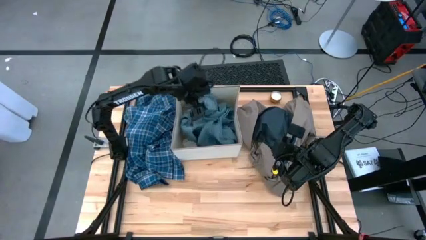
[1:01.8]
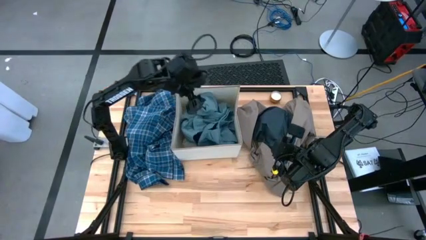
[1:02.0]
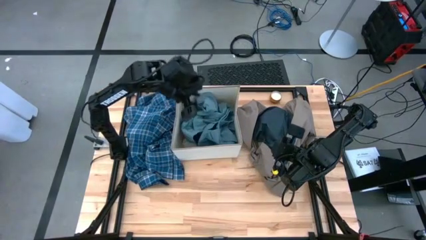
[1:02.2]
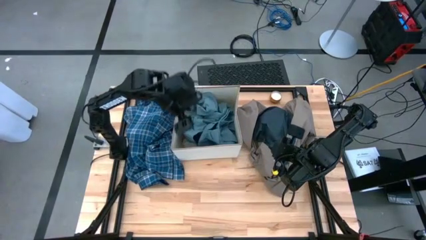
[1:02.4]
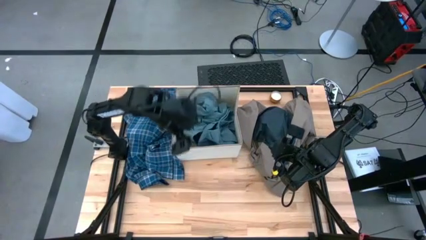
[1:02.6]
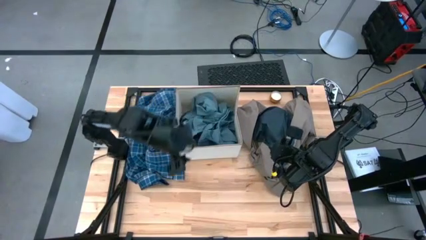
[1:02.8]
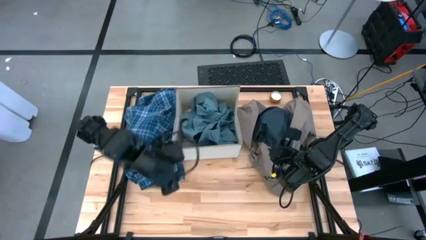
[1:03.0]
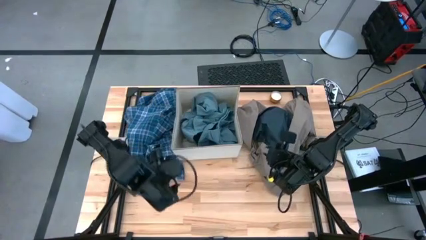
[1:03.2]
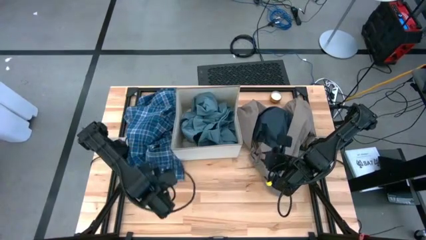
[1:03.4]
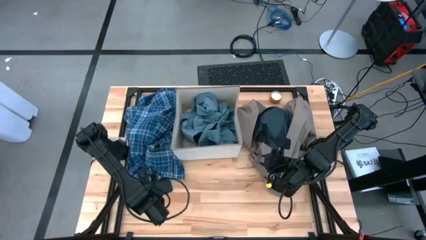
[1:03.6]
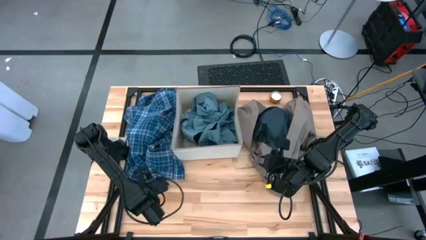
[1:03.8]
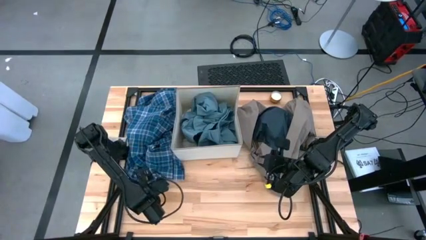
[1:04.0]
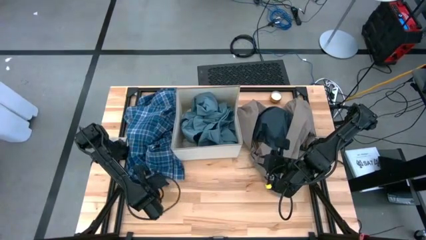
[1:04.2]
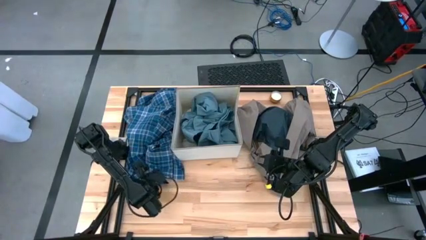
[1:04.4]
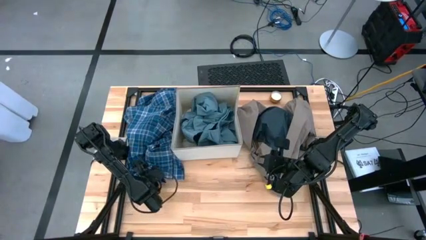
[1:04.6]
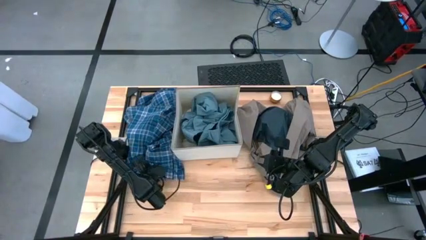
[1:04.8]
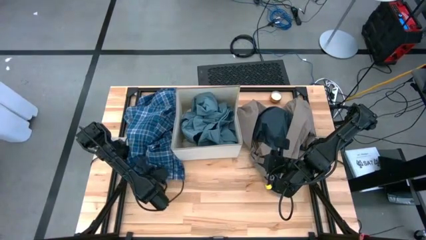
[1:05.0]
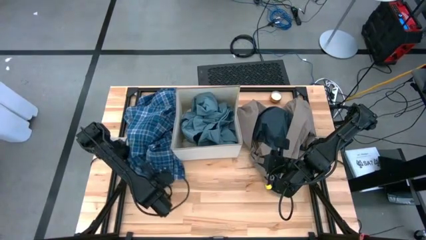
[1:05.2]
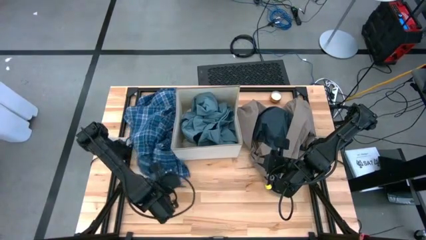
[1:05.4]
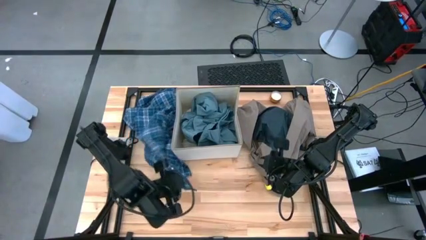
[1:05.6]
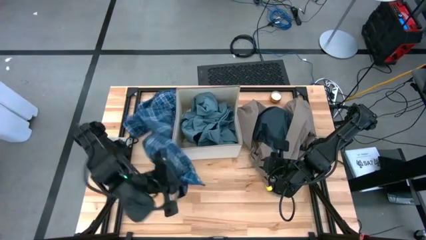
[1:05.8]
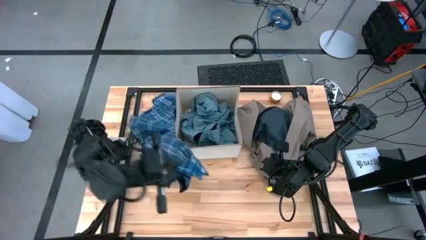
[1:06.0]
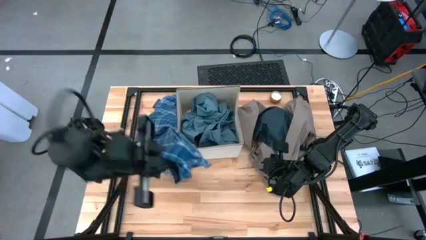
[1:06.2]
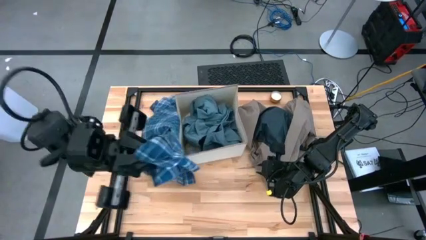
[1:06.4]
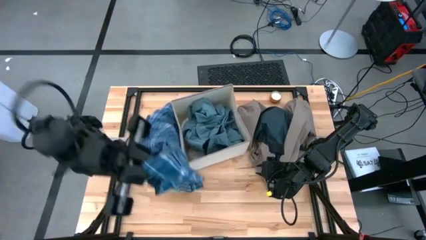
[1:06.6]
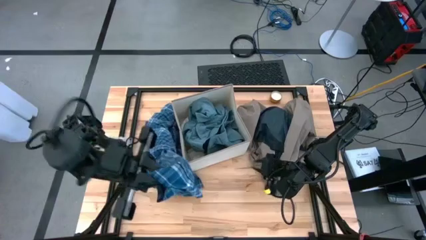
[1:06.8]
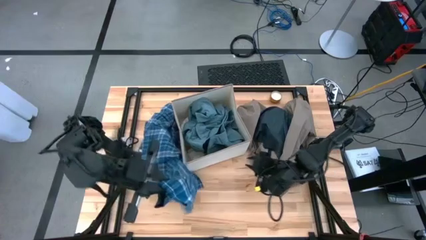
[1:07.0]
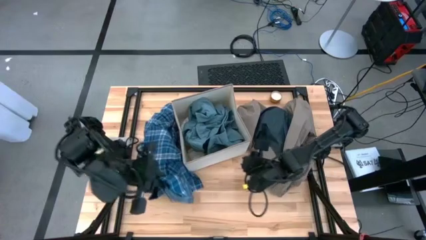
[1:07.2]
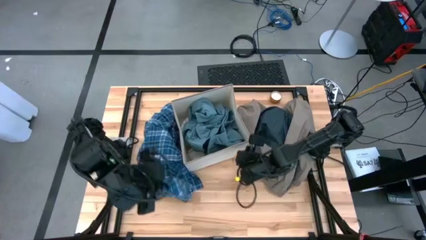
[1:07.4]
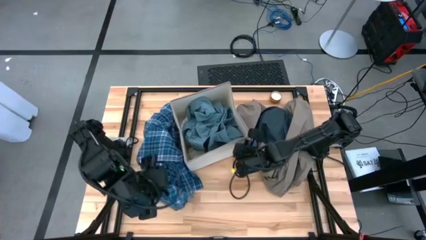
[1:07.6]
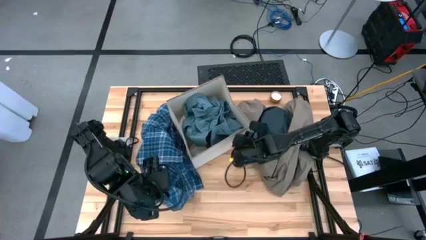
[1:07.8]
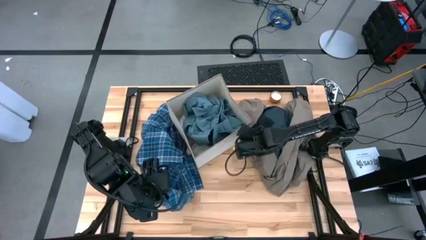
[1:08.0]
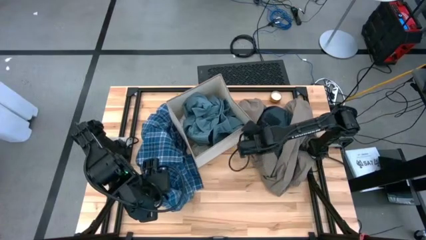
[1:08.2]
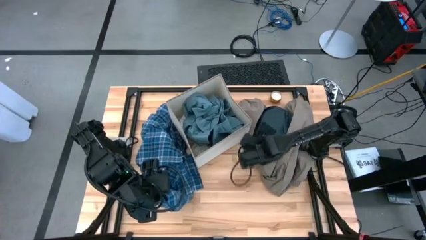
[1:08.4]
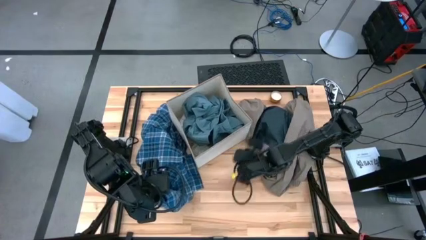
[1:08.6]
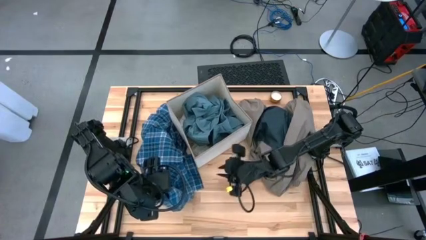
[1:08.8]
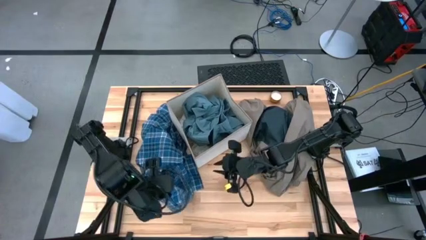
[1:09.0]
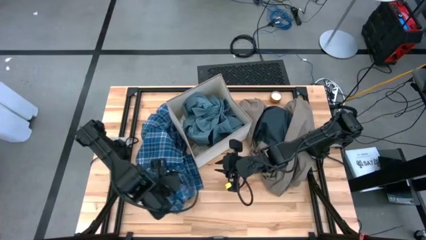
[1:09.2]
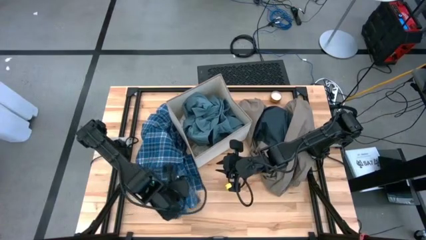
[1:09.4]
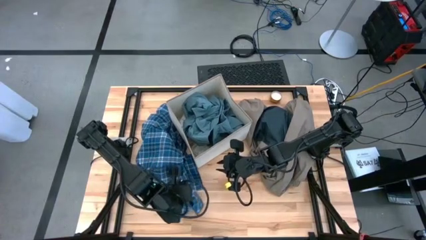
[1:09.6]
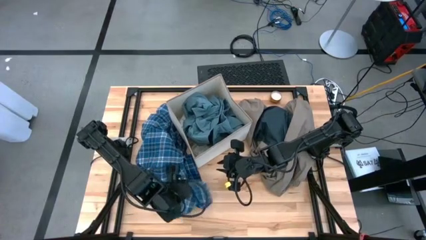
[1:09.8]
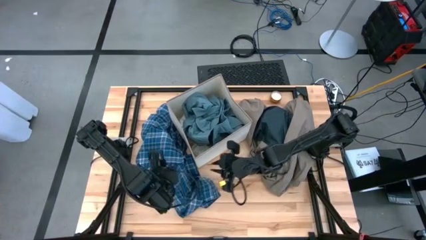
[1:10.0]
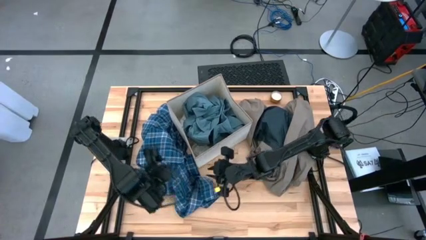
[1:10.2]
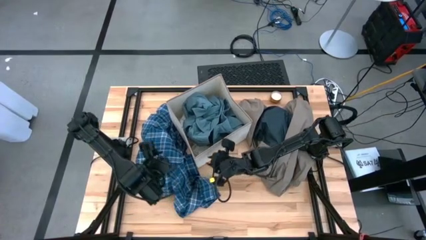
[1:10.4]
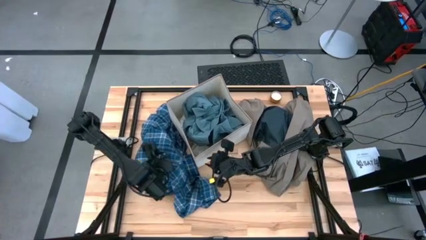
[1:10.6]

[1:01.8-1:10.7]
Task: Sort clothes
Put the blue polo shirt into the laundry organizer

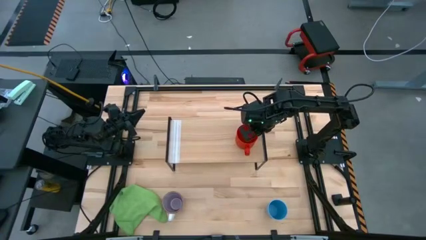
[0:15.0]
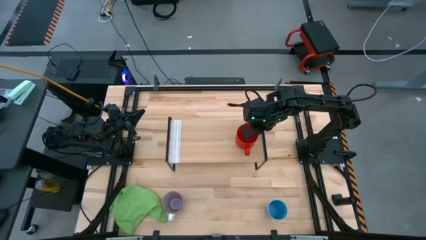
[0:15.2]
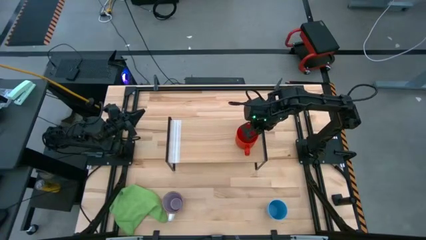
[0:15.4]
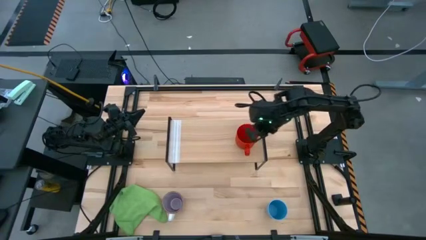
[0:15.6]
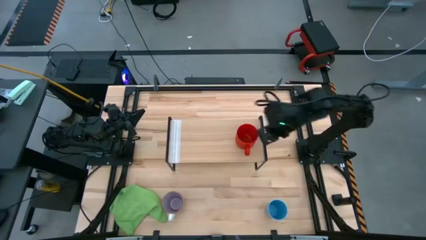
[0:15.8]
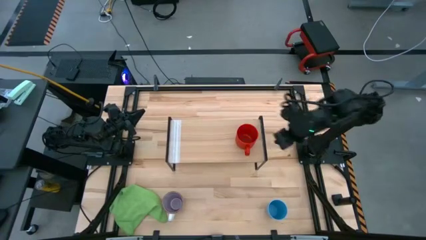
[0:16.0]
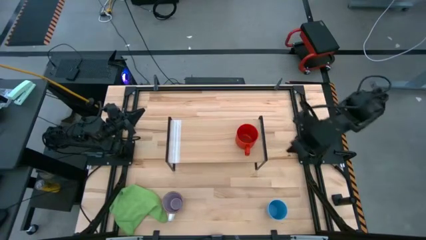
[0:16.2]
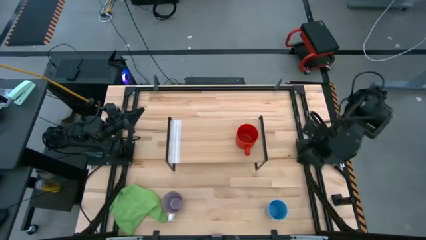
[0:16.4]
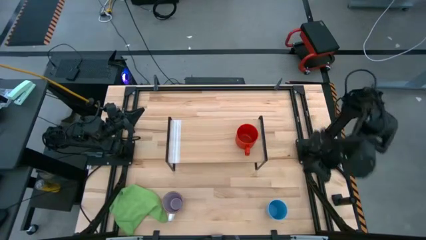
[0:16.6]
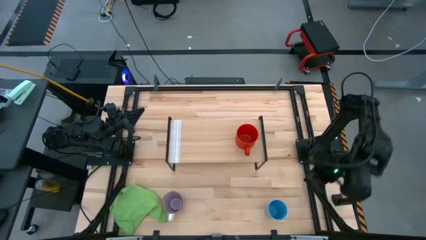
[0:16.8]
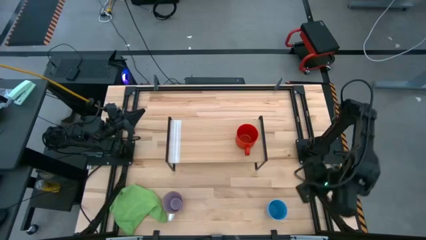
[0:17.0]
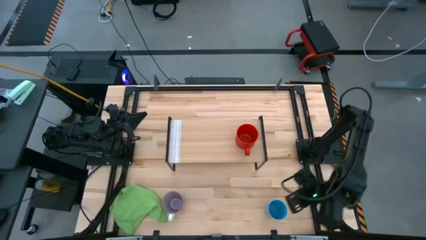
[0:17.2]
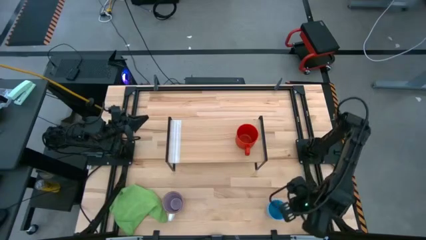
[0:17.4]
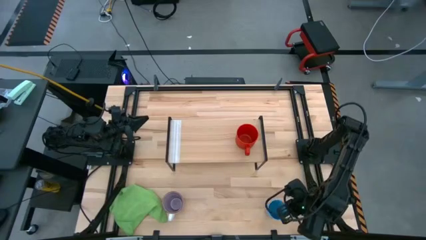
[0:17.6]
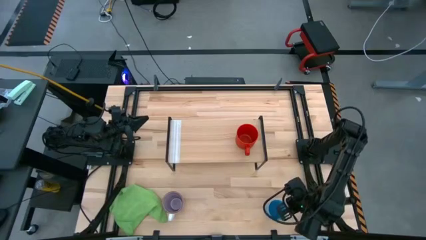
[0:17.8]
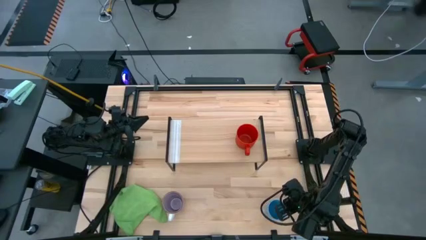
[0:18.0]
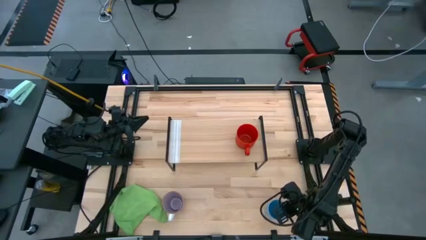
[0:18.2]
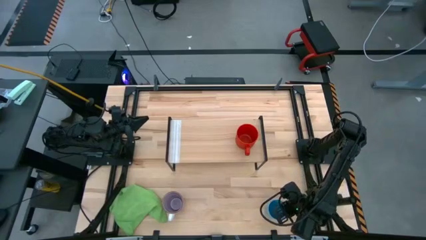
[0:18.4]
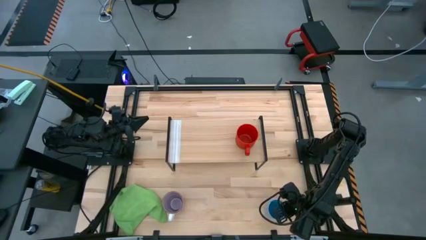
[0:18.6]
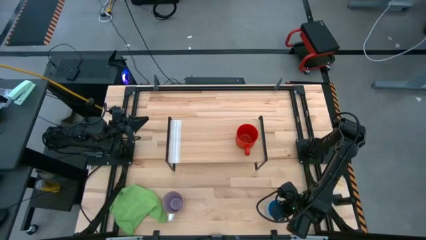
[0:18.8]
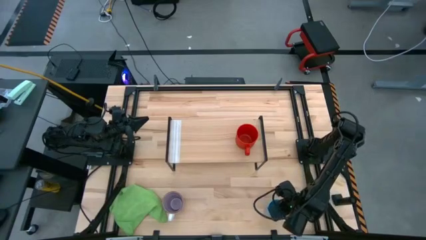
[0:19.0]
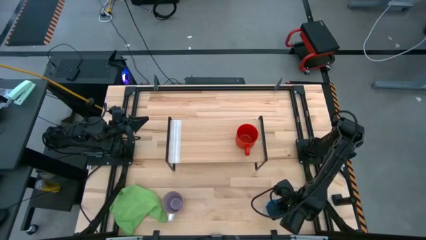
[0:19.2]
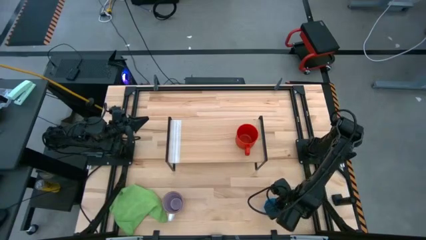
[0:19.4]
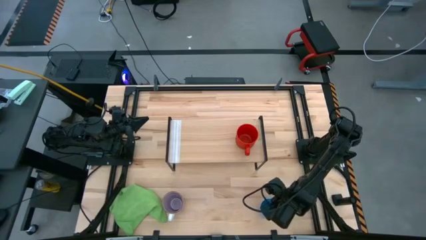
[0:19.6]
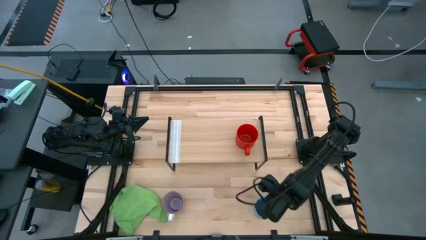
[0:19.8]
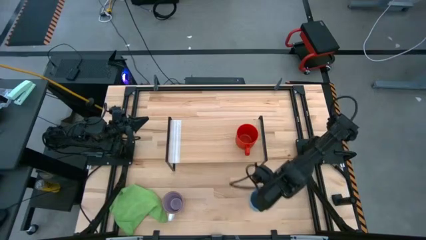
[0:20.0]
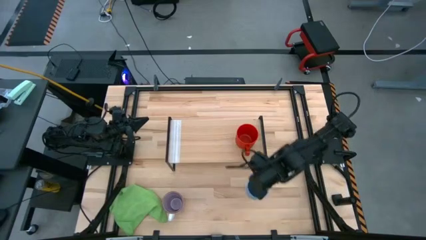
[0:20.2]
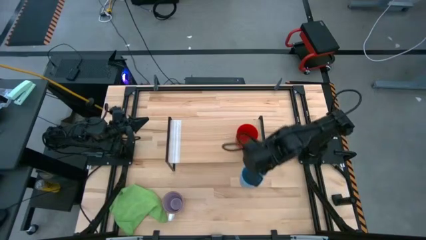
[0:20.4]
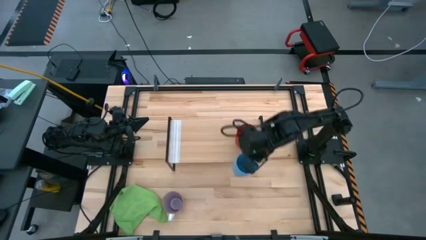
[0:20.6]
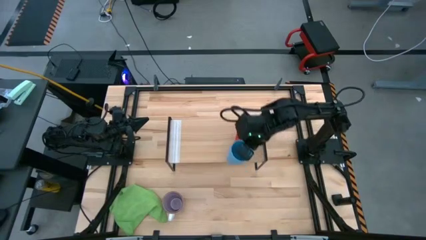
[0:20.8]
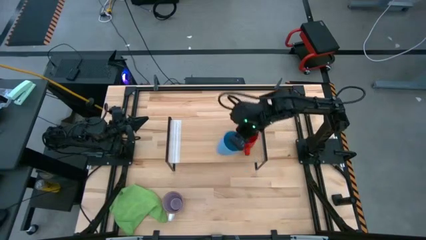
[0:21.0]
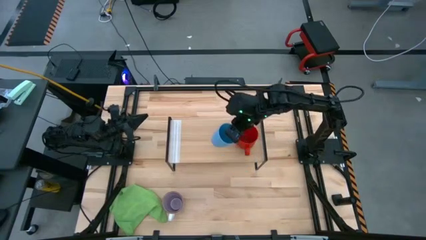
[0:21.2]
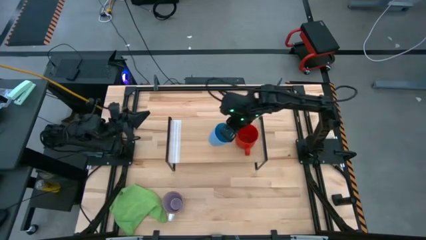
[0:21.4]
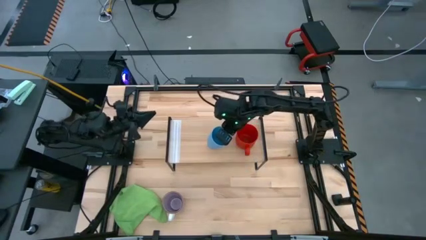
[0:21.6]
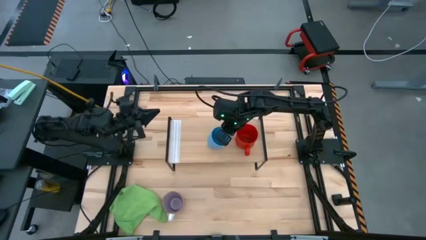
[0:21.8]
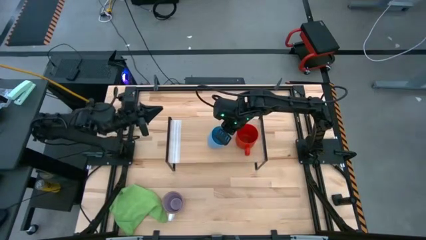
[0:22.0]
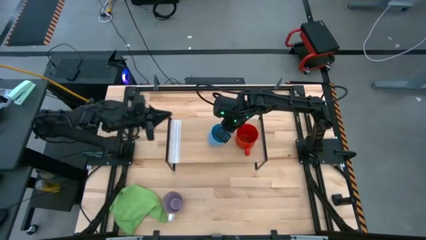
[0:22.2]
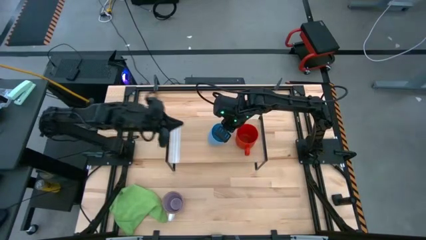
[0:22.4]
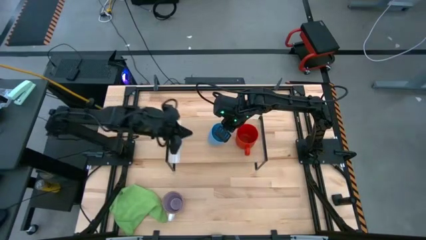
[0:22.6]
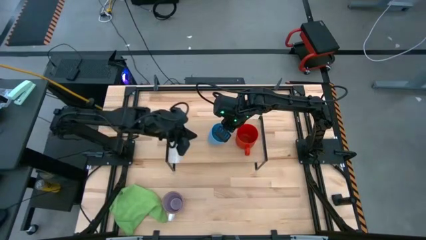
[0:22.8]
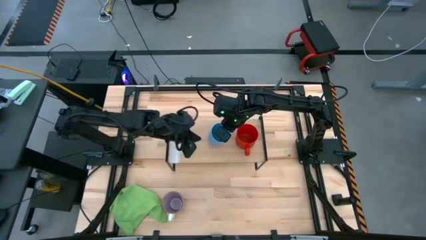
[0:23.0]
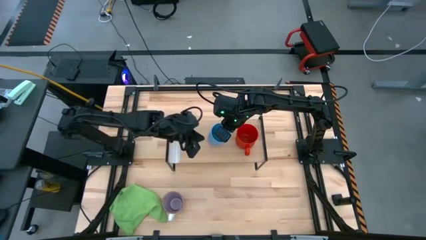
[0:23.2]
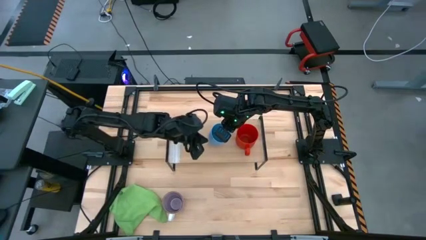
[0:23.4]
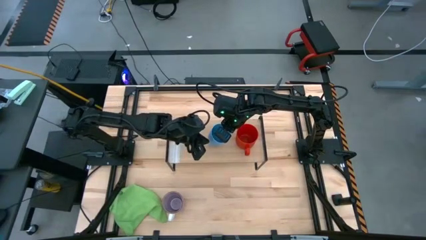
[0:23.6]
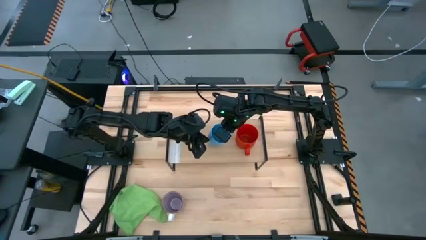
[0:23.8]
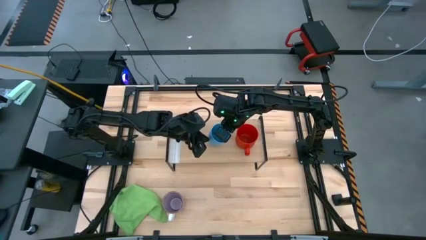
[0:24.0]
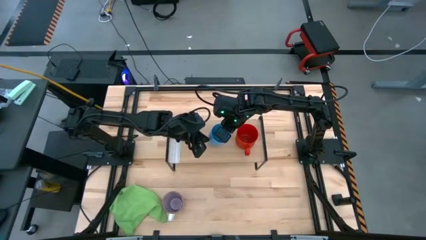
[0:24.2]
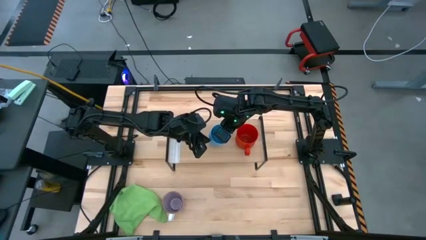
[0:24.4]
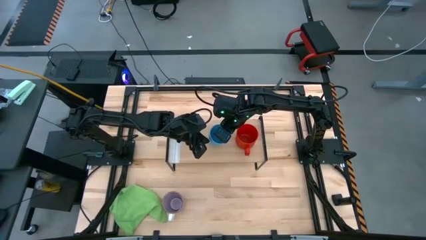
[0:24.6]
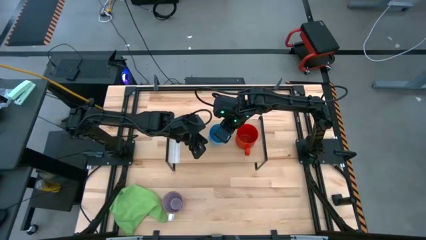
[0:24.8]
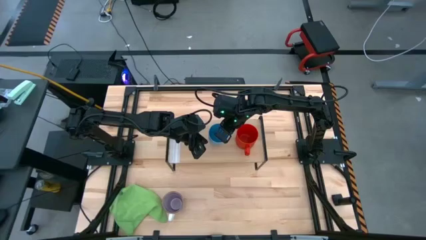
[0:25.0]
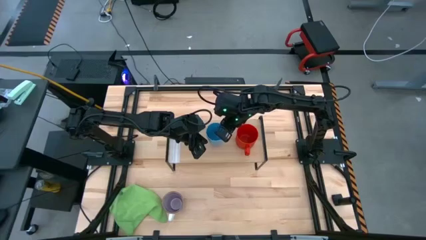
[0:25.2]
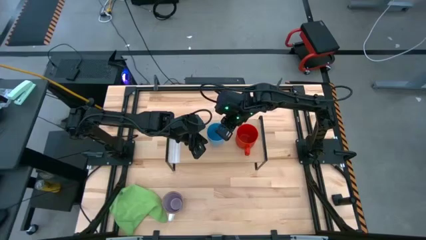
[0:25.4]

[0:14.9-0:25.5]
Task: Stack small to large cups/mugs on shelf
Put the blue cup on the shelf
